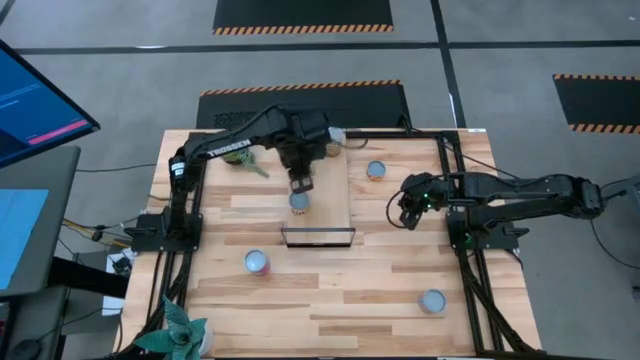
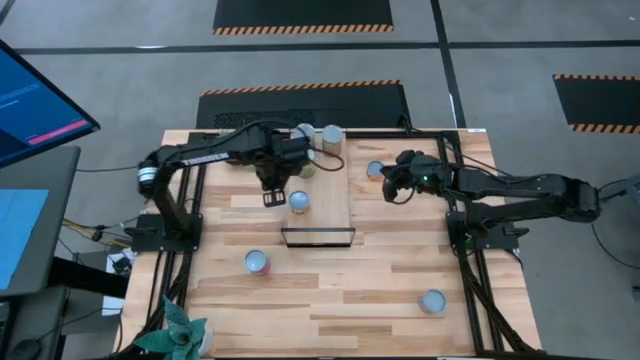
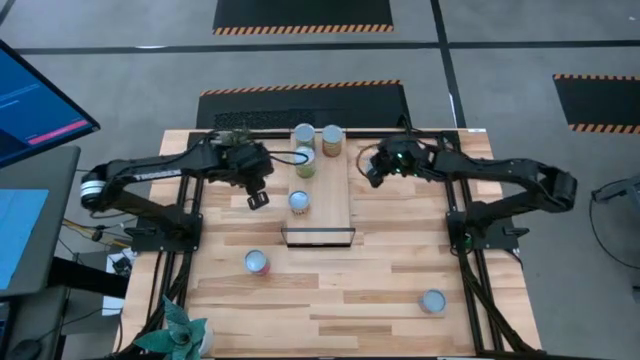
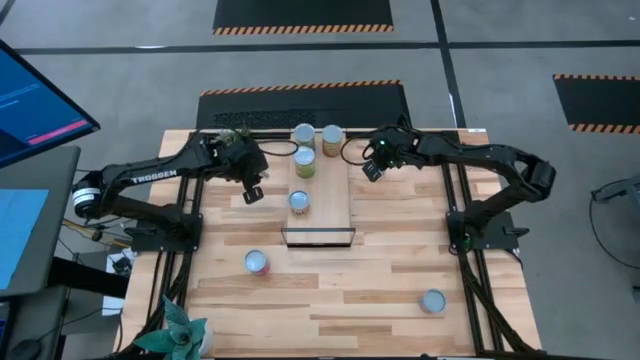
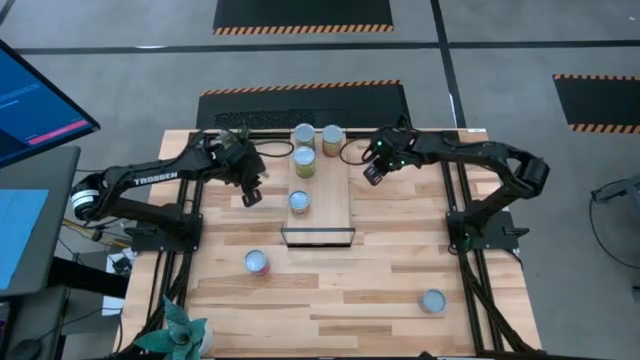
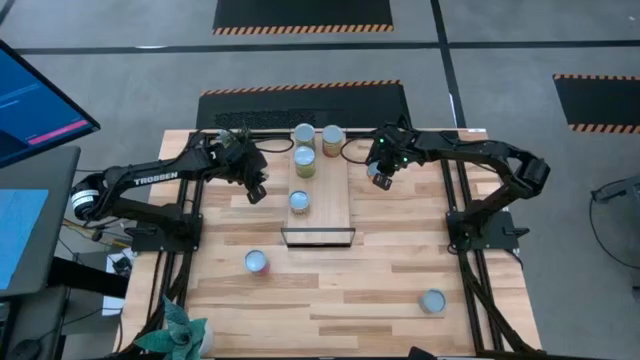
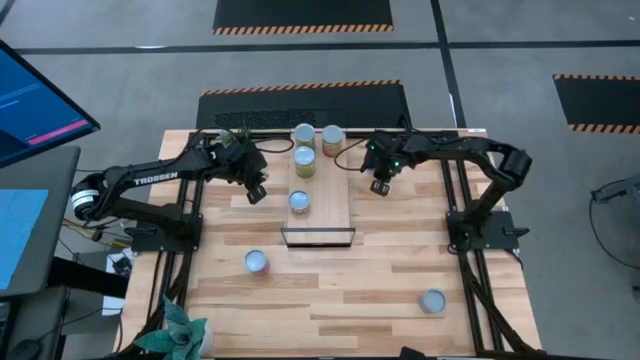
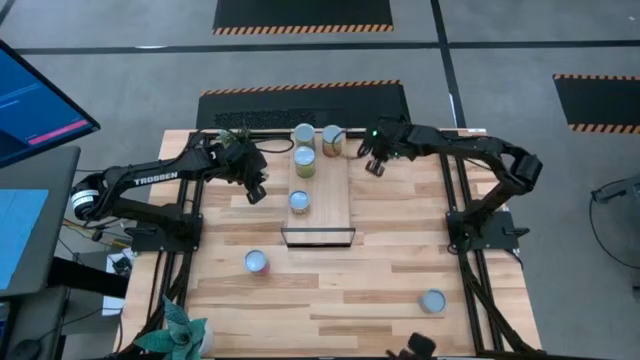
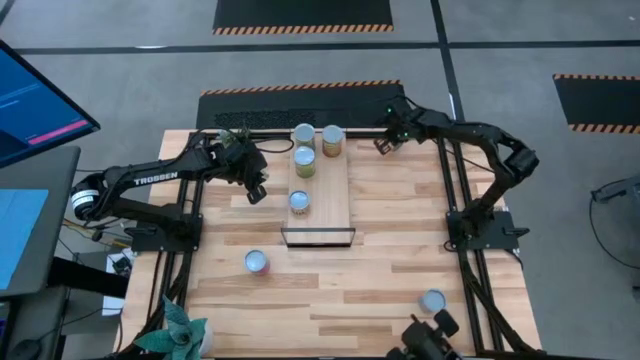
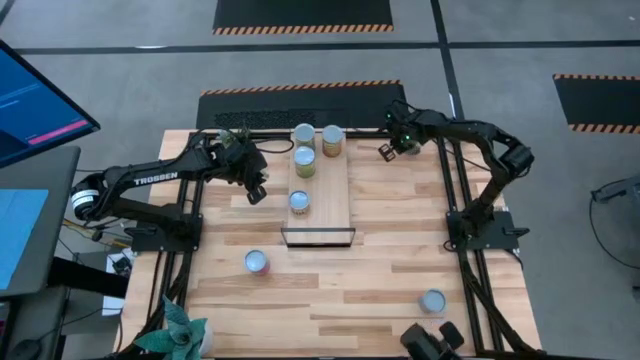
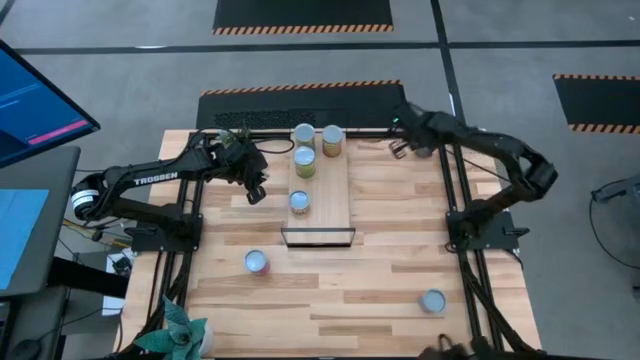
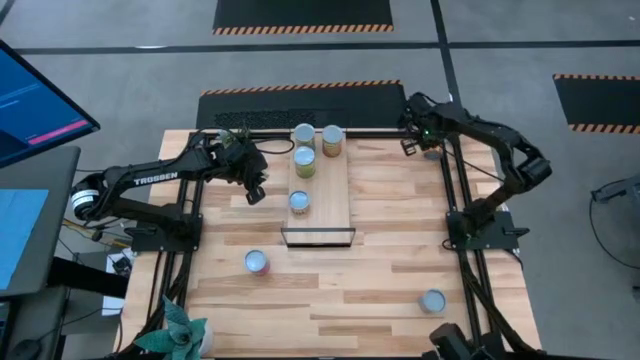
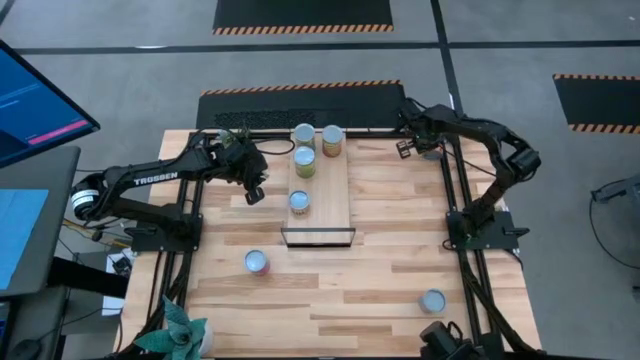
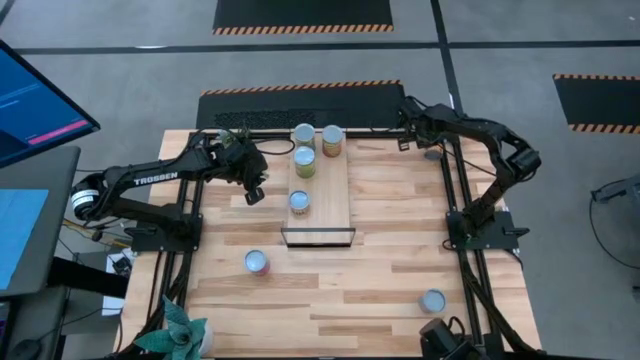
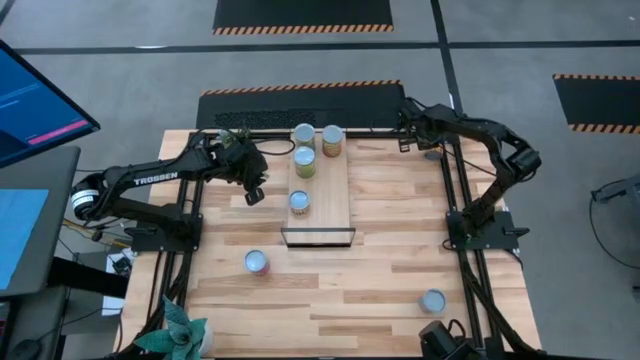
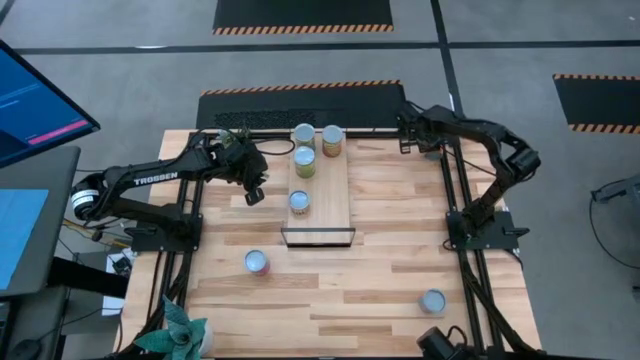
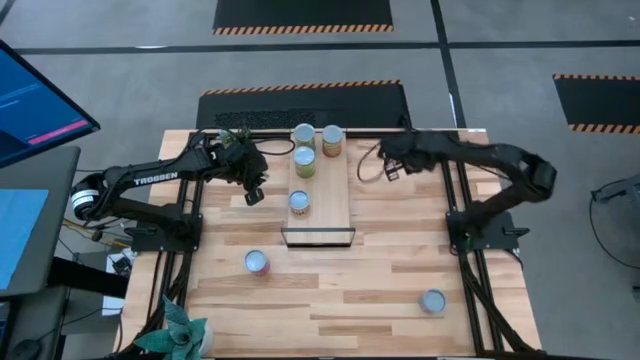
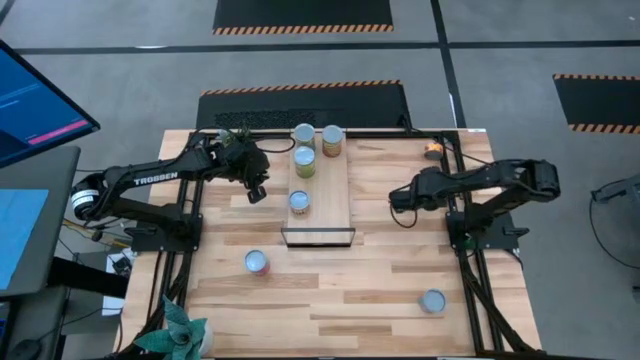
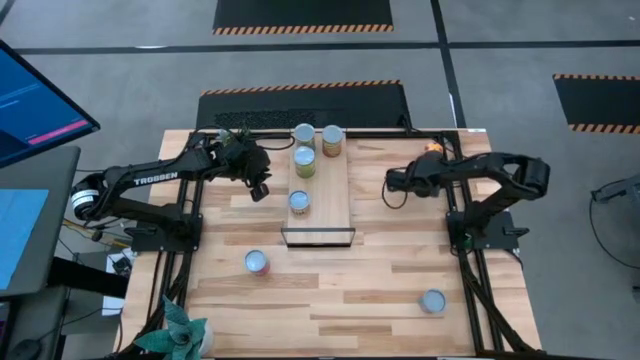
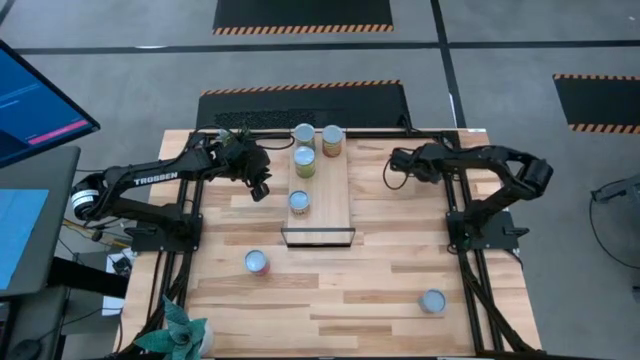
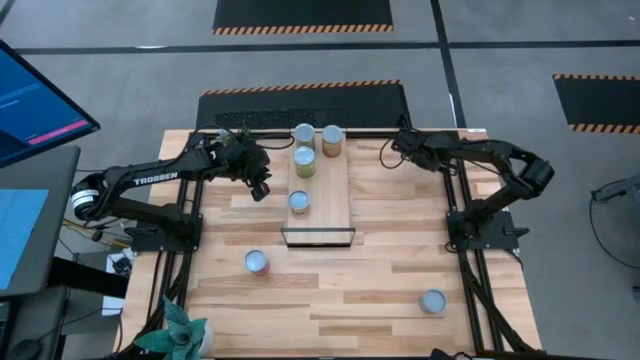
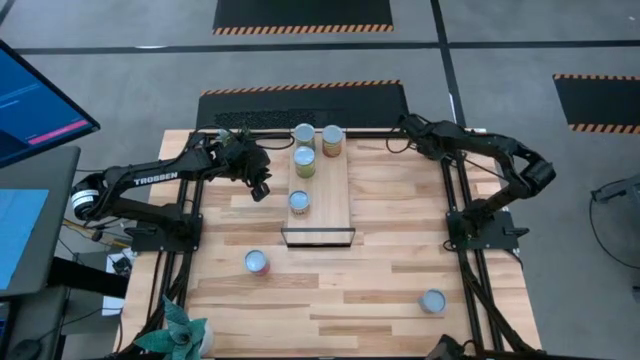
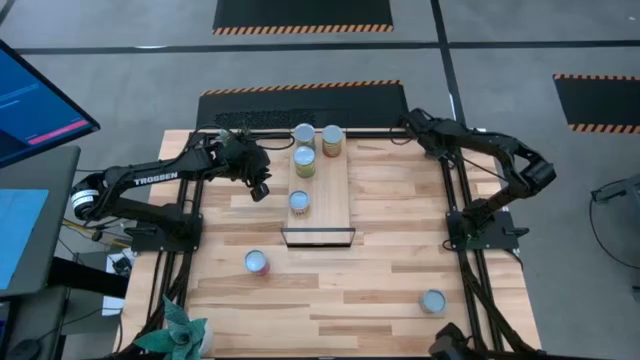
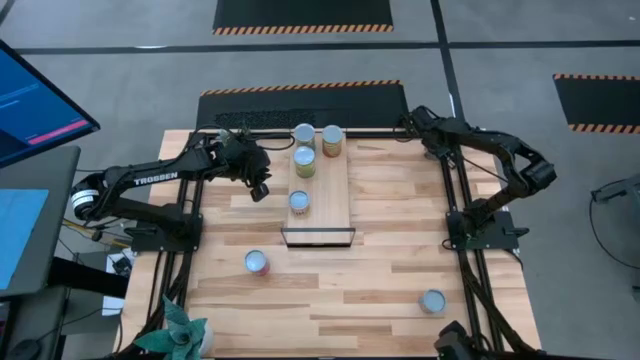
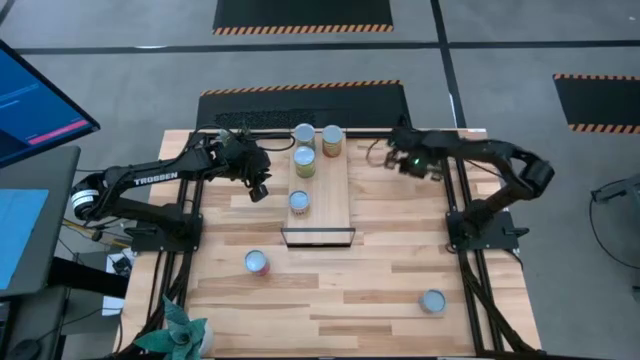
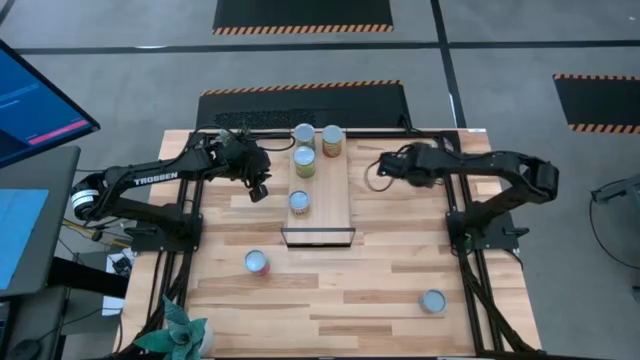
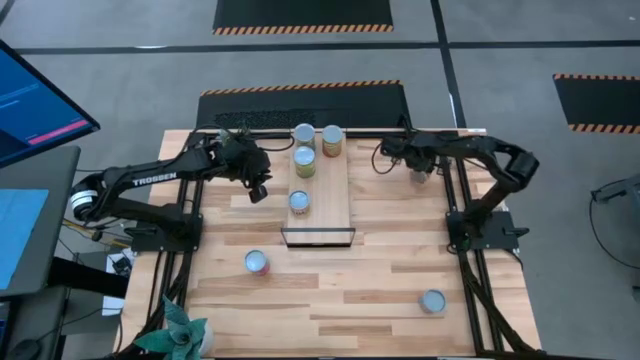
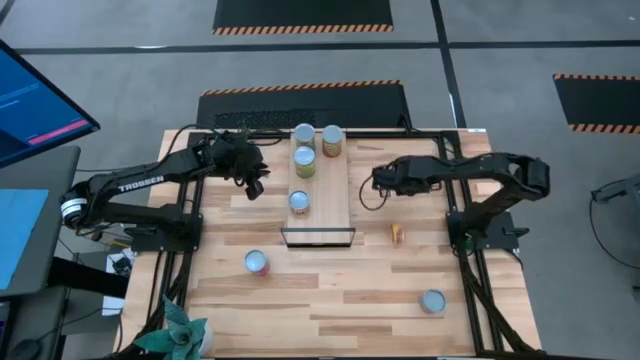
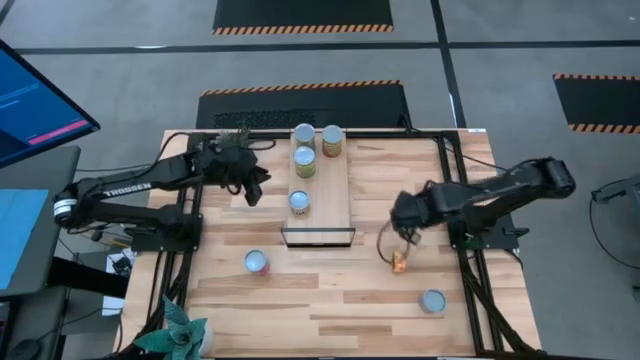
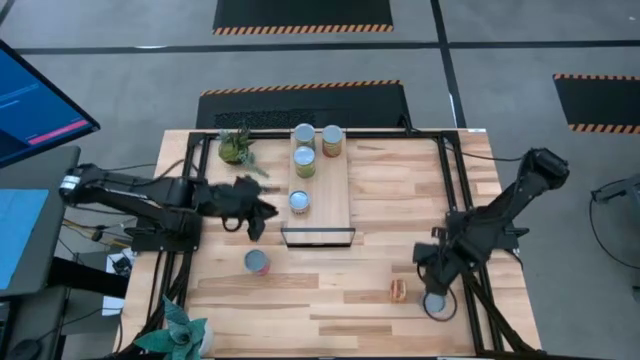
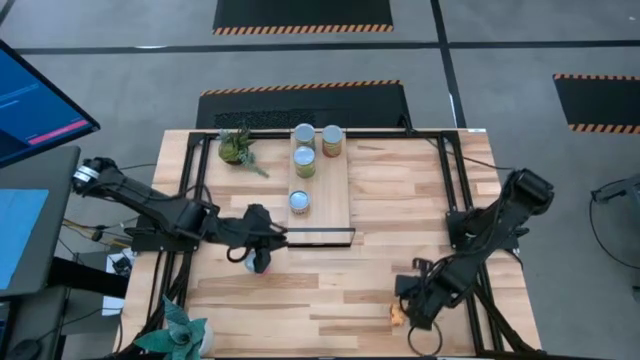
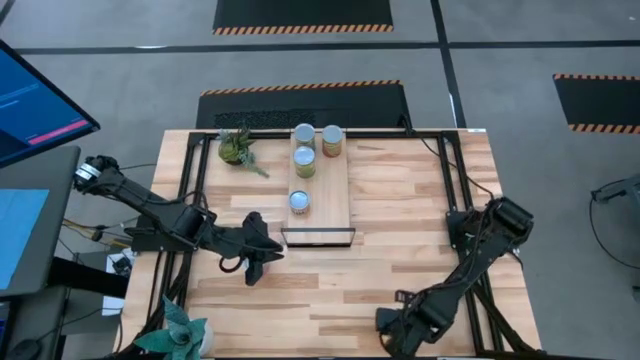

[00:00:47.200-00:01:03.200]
Task: Pick and place cans onto a shelf
Put the canned pineapple ring on the shelf

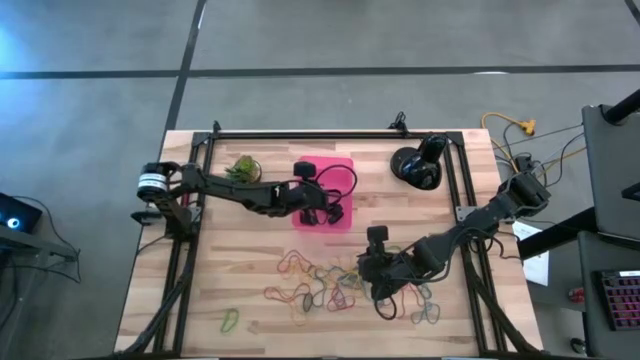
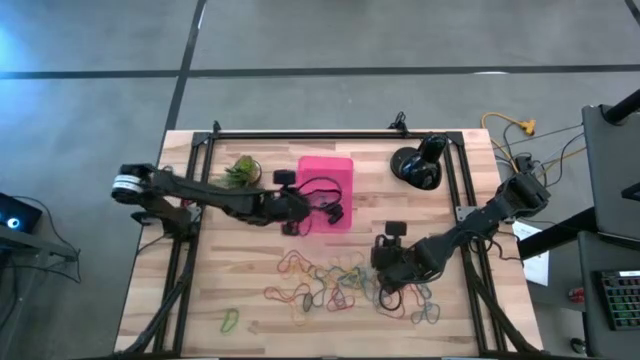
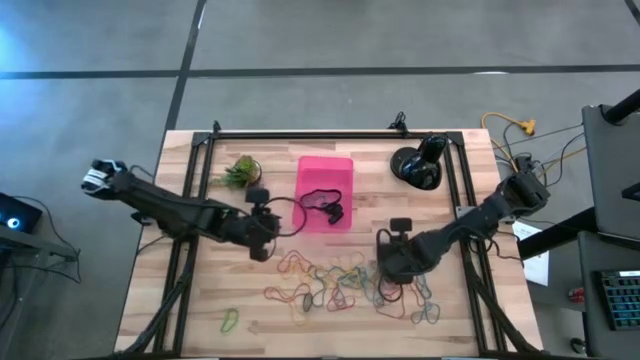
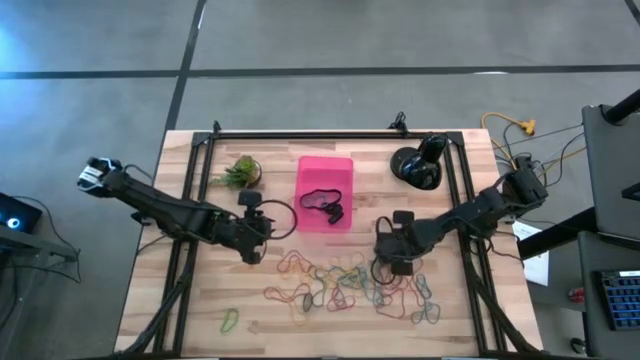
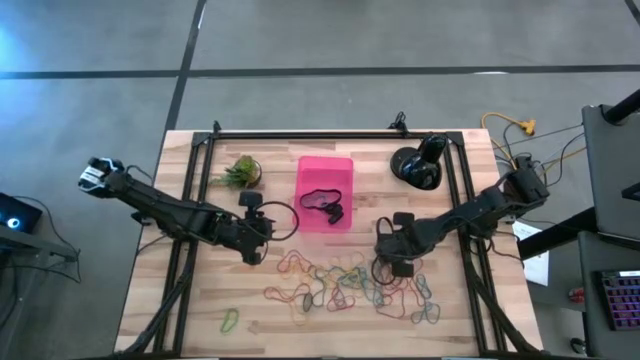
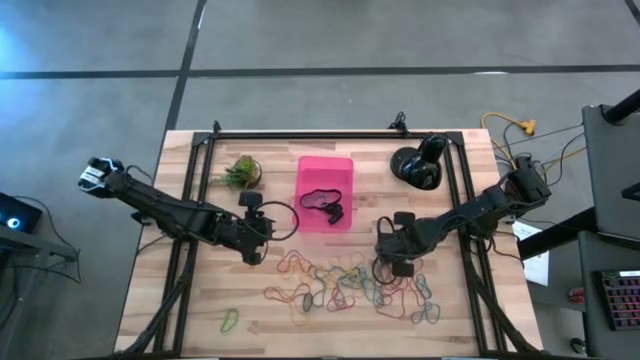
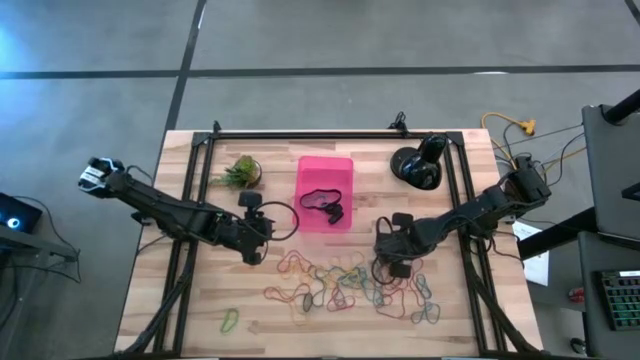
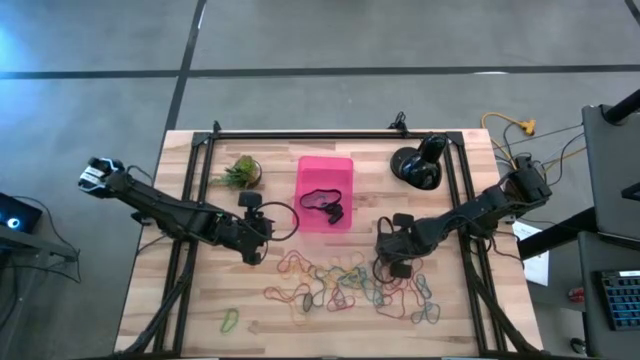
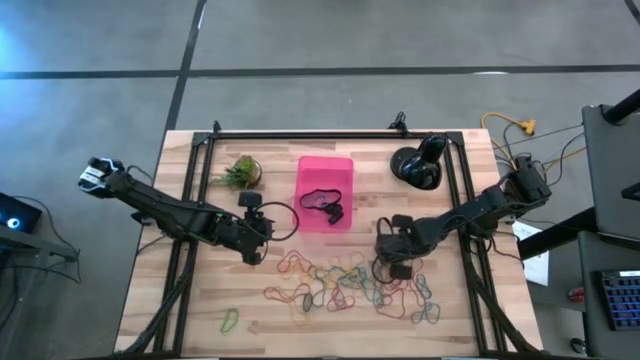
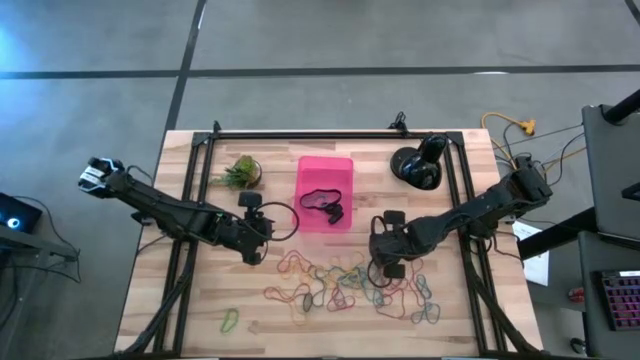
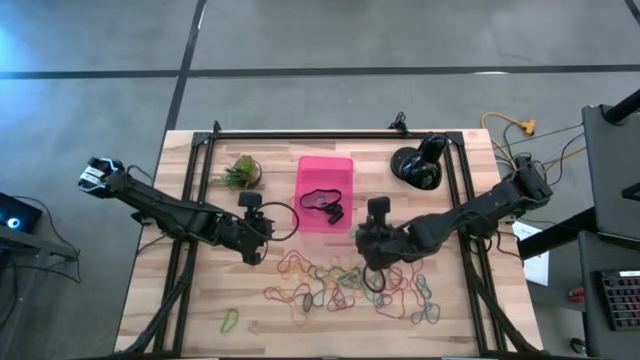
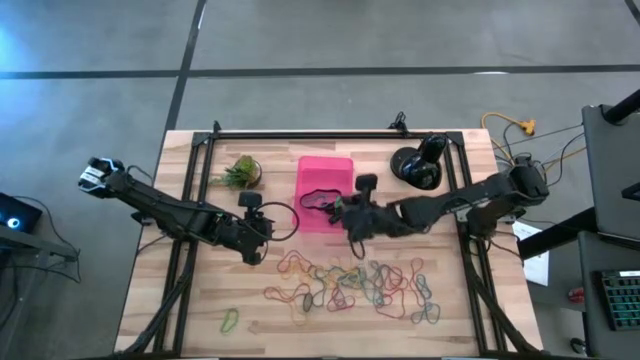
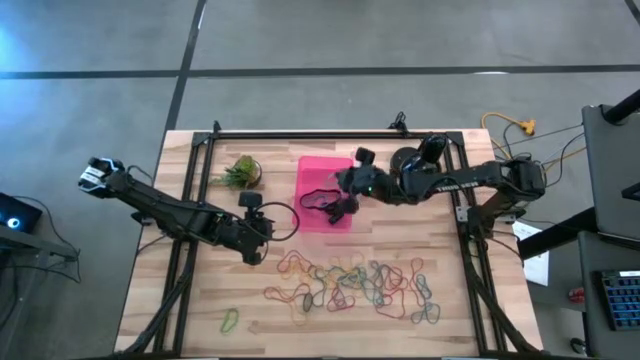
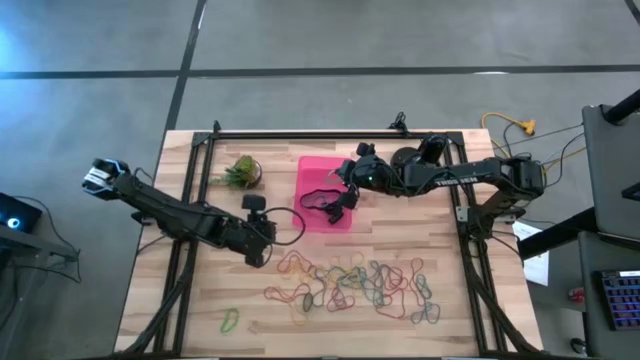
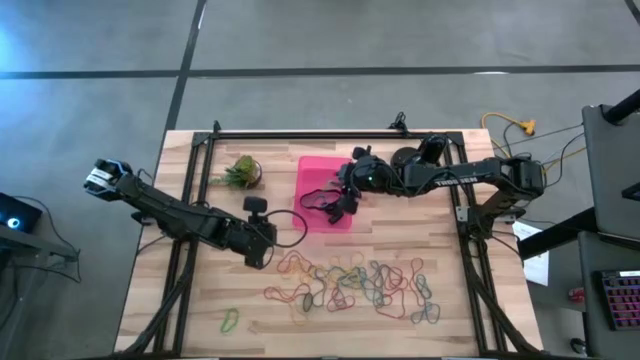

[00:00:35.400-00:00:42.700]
Task: Pick and place rubber bands into bin
Put the green rubber bands into the pink bin
